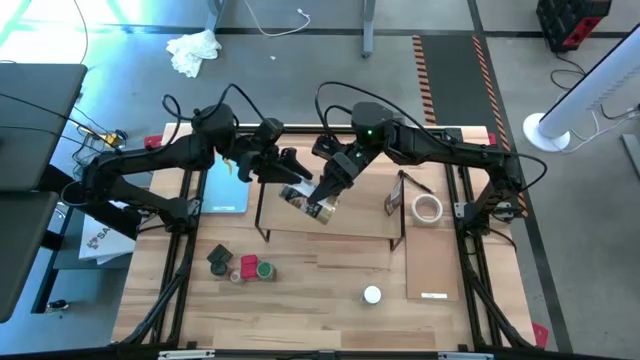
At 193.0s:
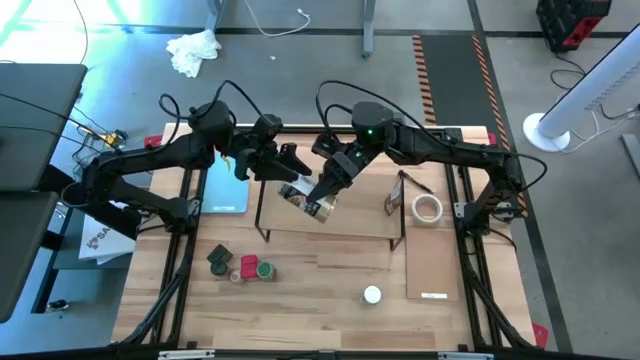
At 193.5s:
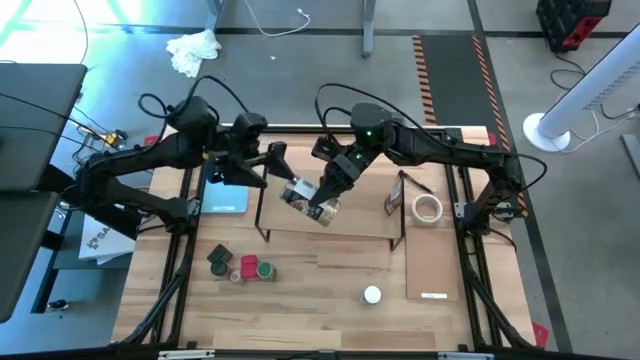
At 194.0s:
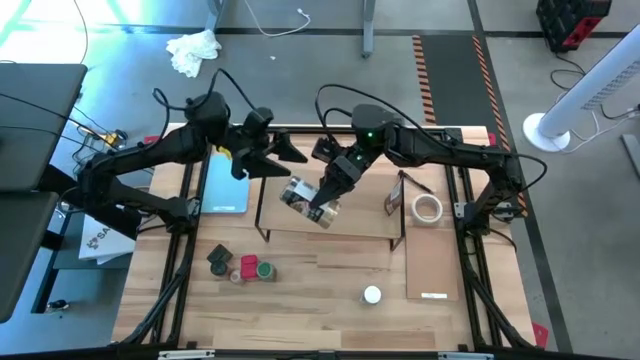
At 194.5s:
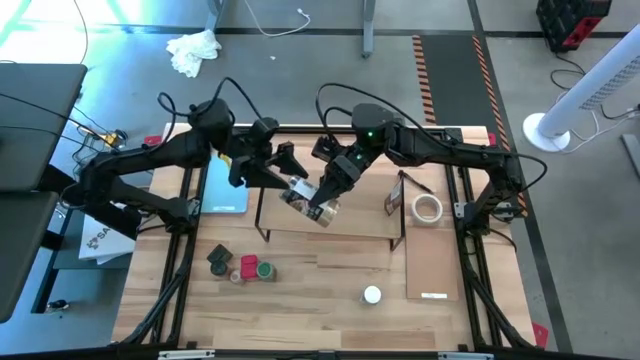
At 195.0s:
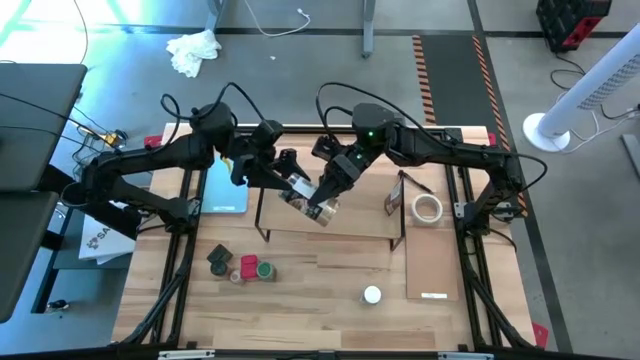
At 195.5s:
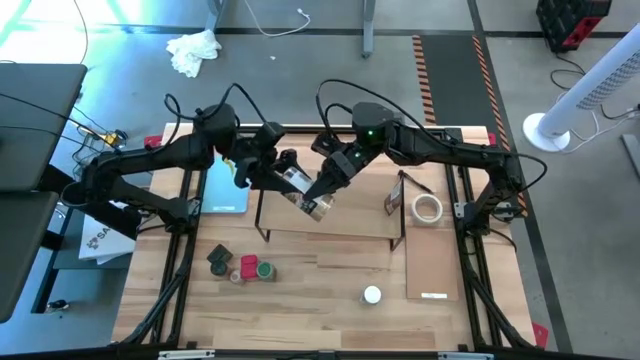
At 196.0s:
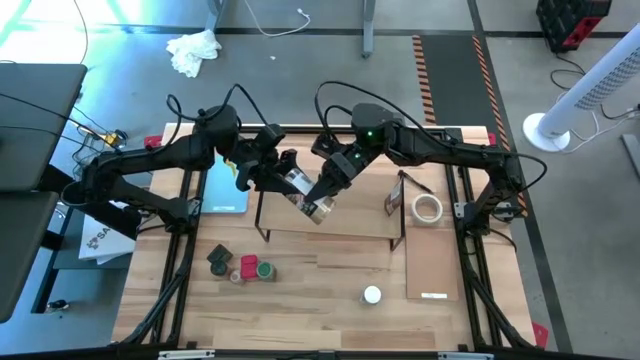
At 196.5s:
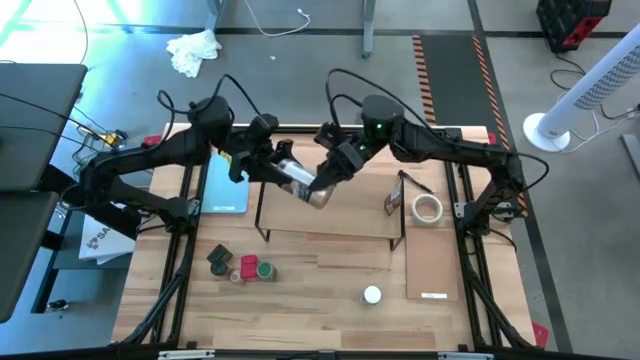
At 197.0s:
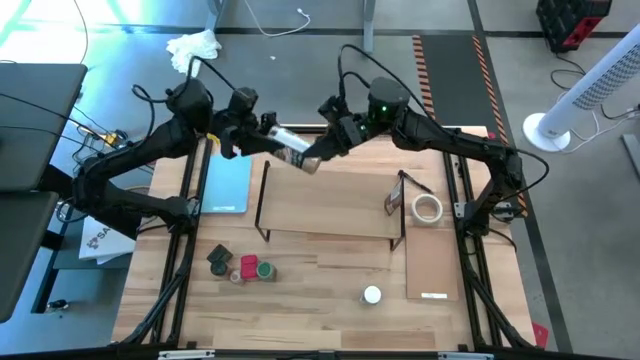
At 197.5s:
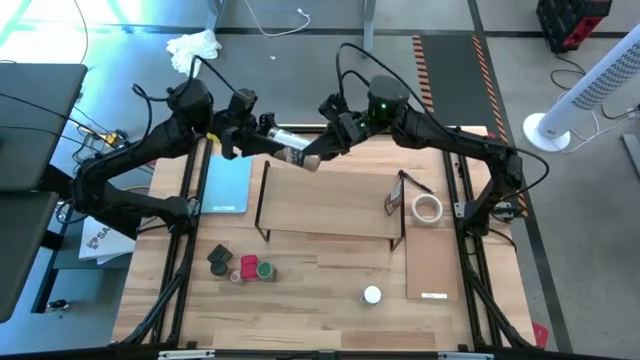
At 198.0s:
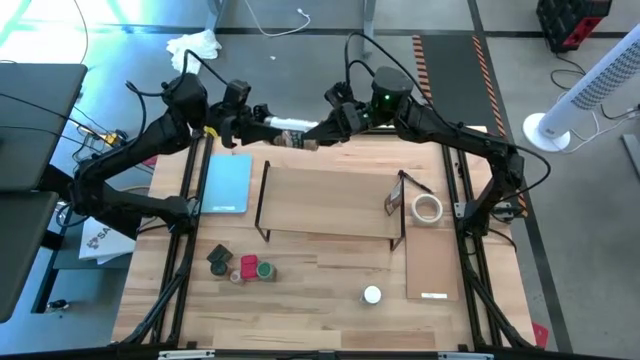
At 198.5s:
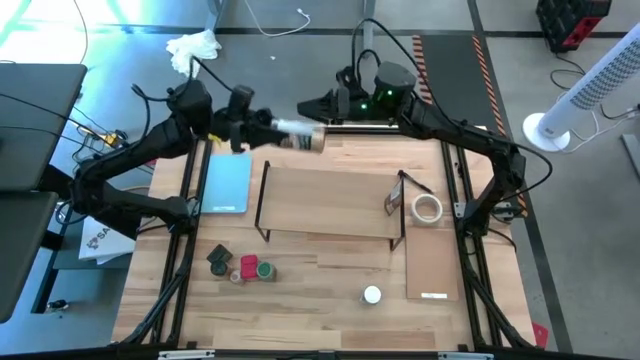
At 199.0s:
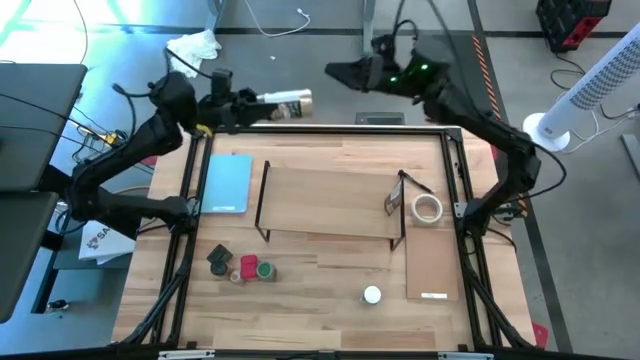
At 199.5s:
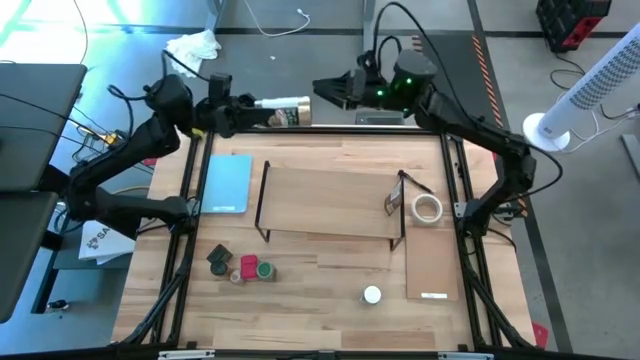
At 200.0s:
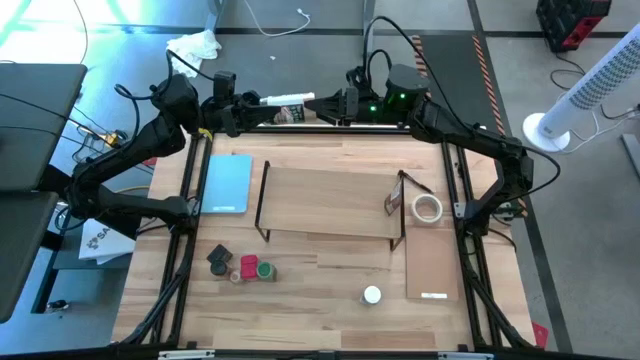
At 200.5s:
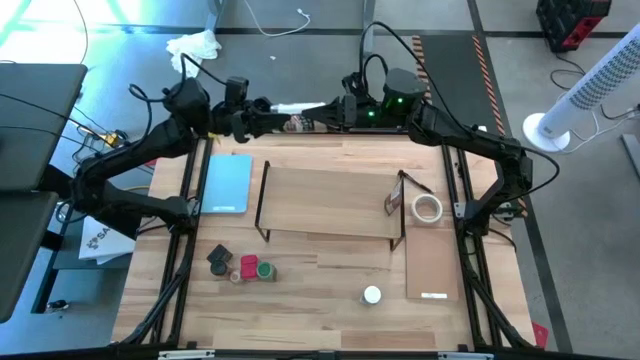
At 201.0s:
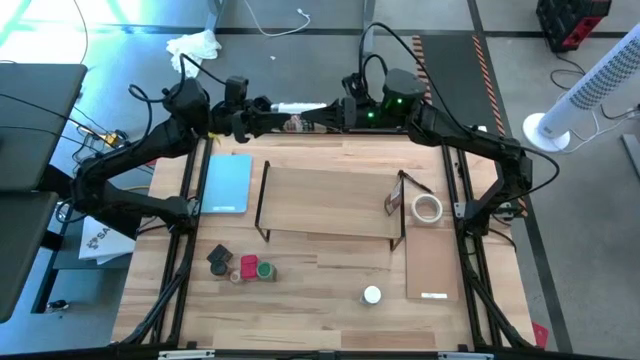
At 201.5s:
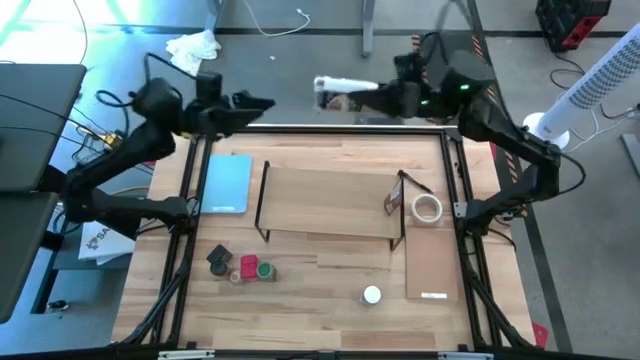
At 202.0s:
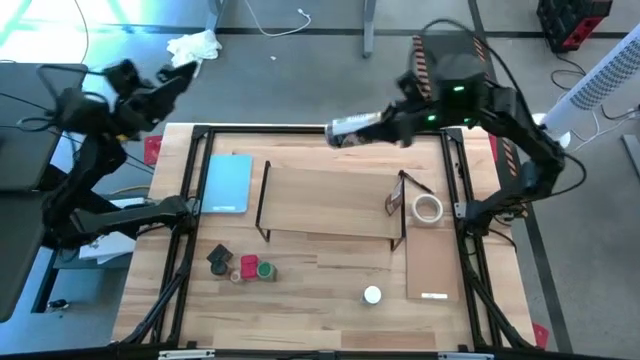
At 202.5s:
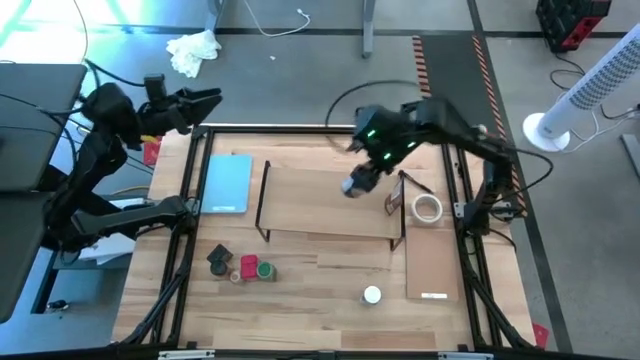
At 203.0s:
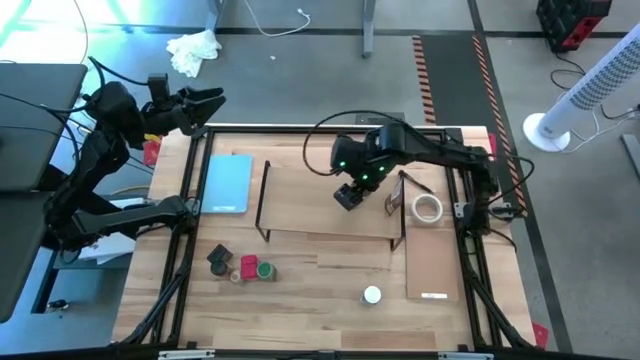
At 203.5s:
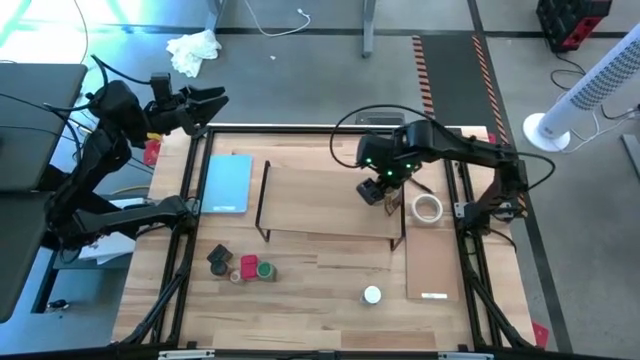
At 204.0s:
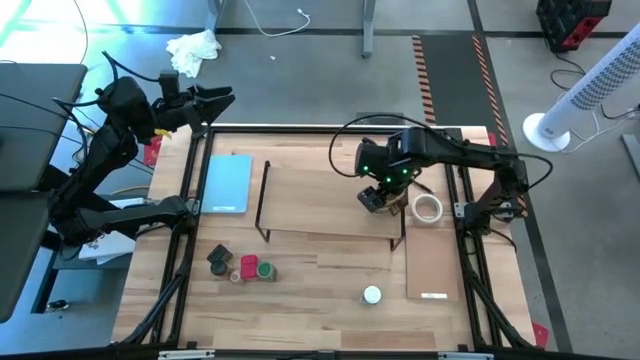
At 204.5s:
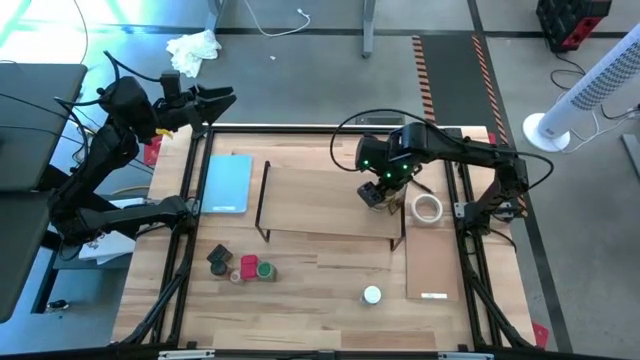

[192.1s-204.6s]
Task: Shelf spices
Put the brown seasoning bottle on the shelf
